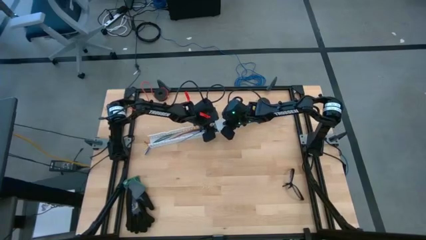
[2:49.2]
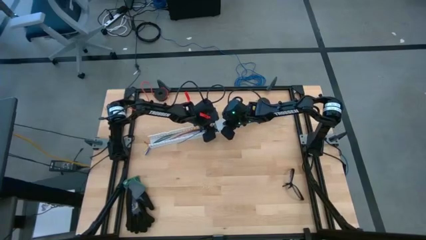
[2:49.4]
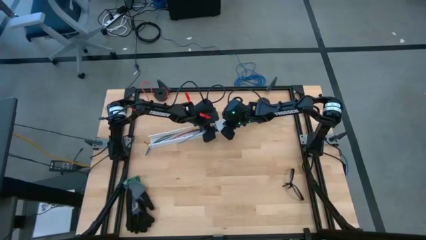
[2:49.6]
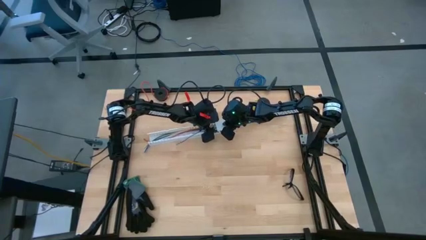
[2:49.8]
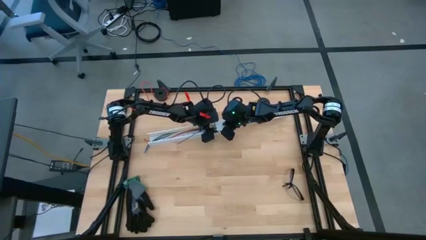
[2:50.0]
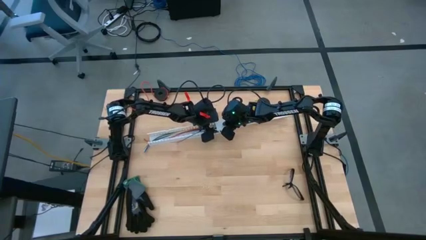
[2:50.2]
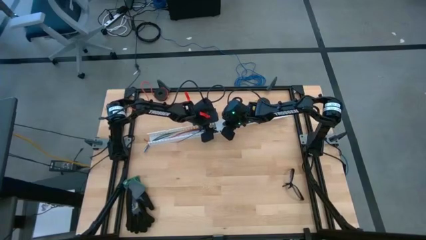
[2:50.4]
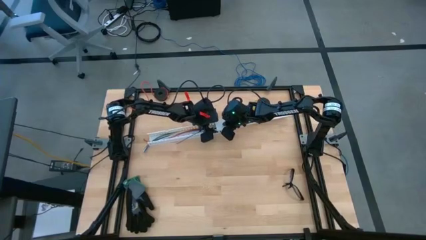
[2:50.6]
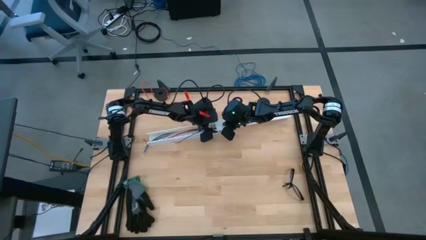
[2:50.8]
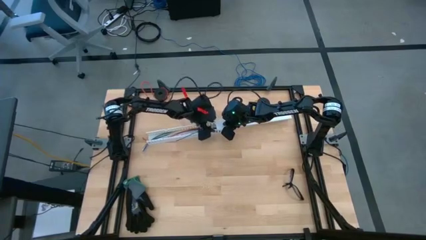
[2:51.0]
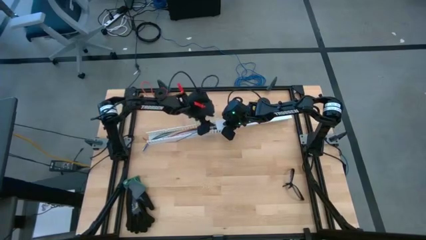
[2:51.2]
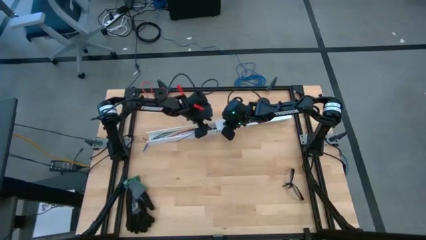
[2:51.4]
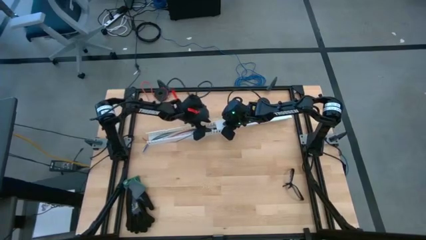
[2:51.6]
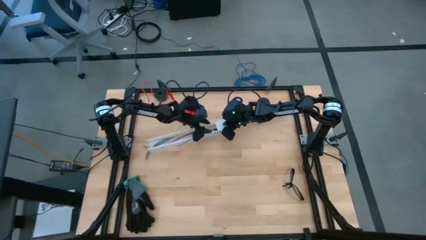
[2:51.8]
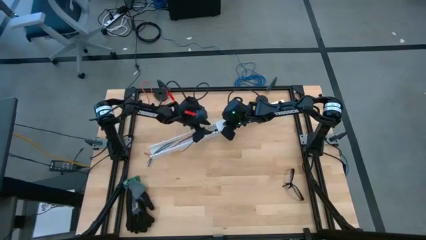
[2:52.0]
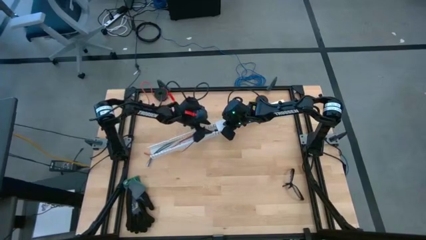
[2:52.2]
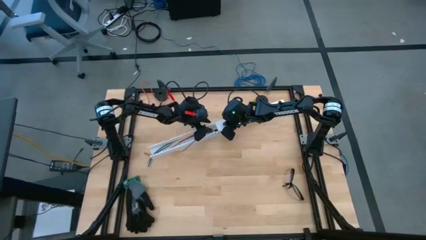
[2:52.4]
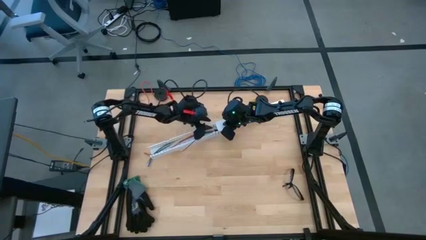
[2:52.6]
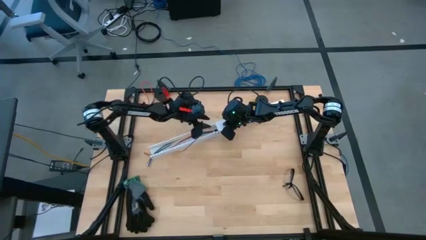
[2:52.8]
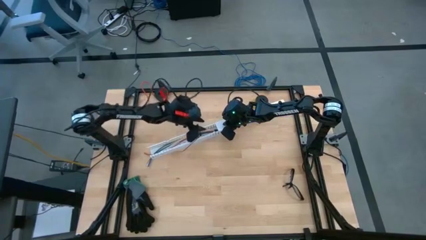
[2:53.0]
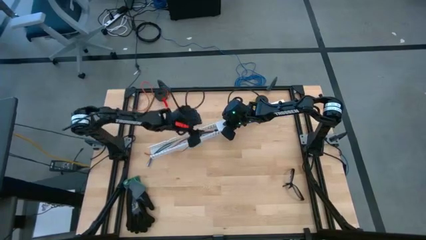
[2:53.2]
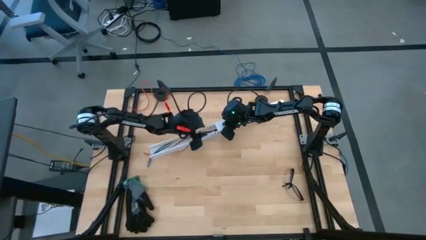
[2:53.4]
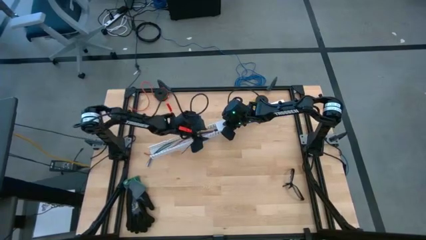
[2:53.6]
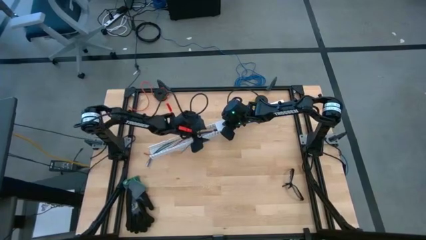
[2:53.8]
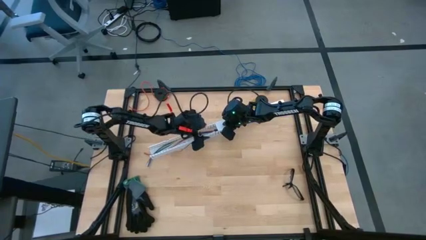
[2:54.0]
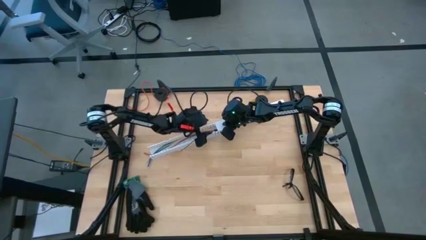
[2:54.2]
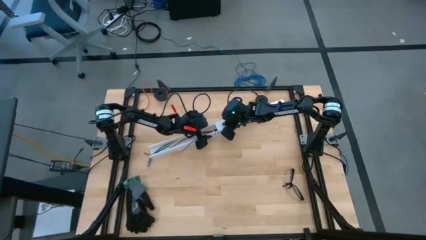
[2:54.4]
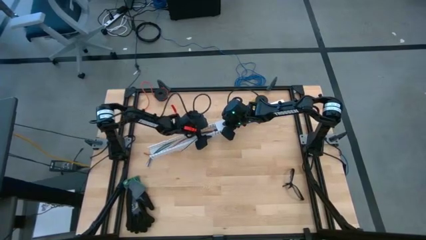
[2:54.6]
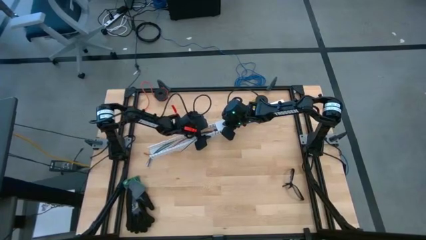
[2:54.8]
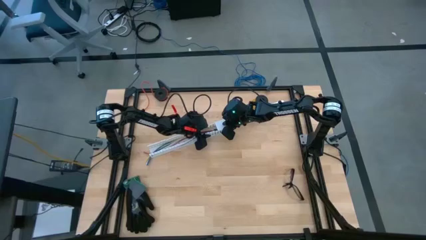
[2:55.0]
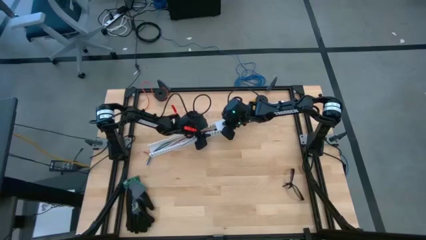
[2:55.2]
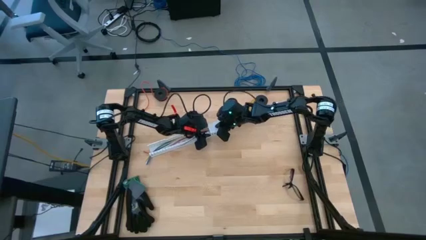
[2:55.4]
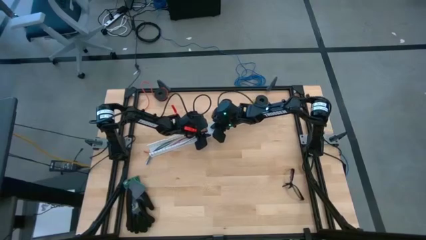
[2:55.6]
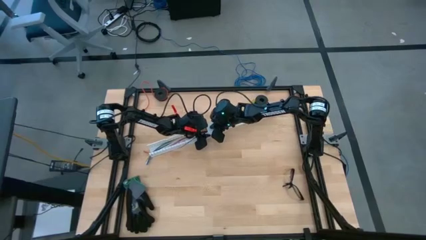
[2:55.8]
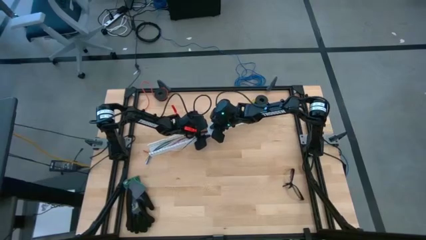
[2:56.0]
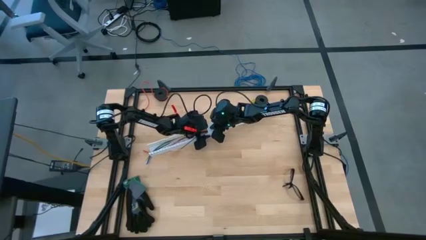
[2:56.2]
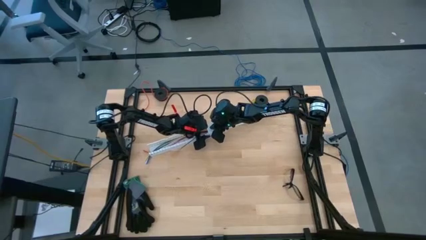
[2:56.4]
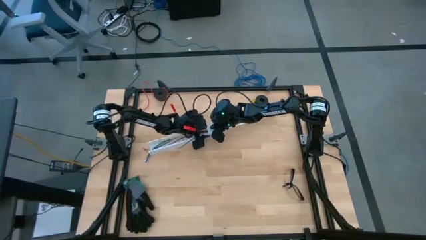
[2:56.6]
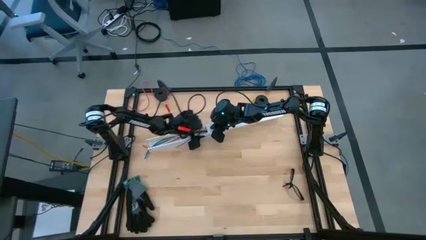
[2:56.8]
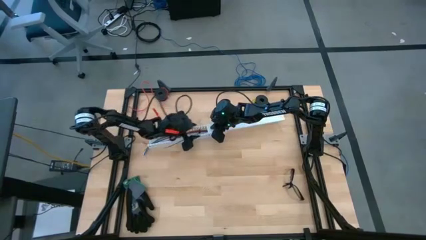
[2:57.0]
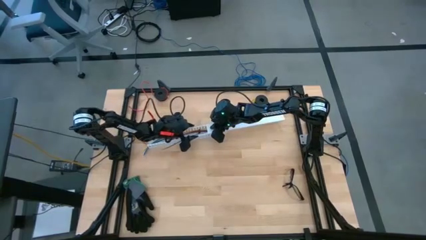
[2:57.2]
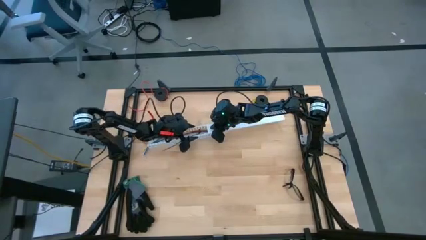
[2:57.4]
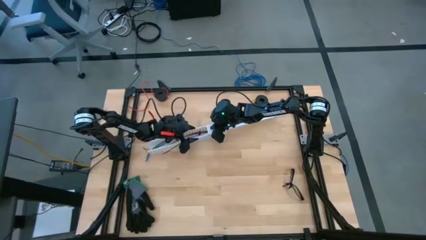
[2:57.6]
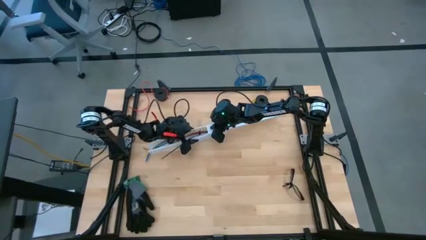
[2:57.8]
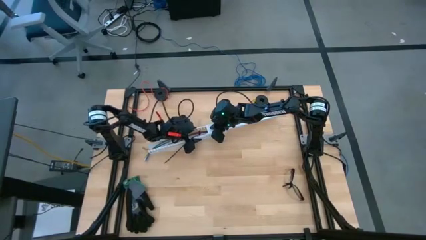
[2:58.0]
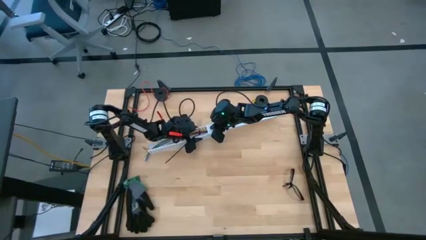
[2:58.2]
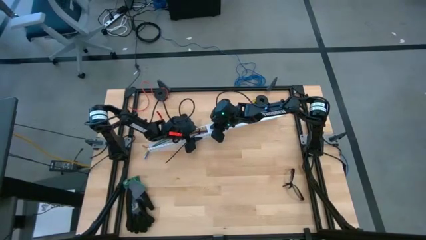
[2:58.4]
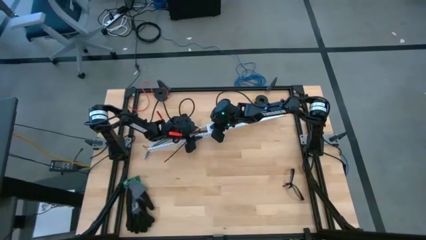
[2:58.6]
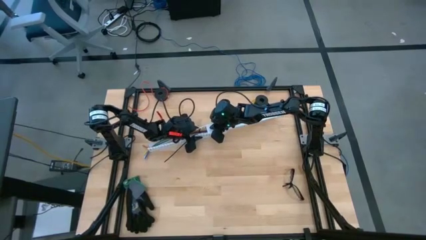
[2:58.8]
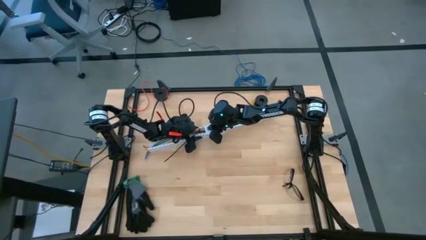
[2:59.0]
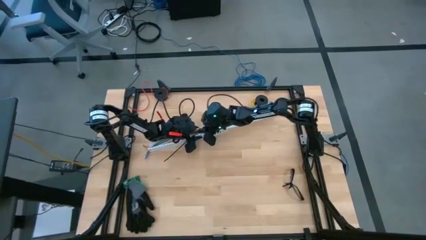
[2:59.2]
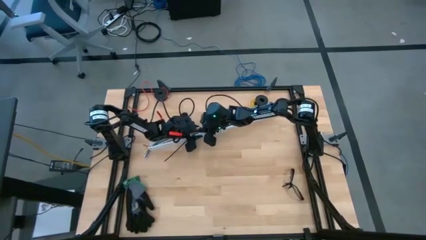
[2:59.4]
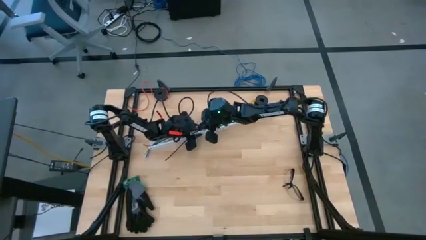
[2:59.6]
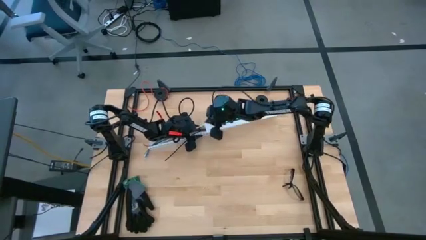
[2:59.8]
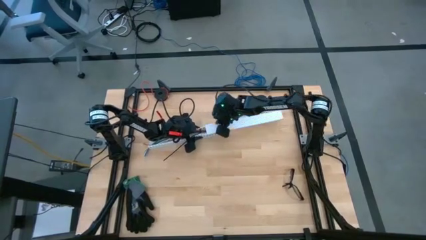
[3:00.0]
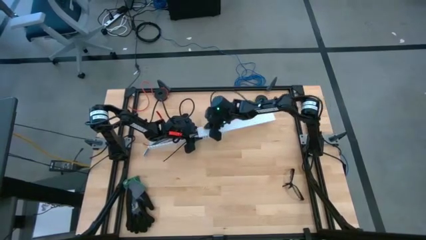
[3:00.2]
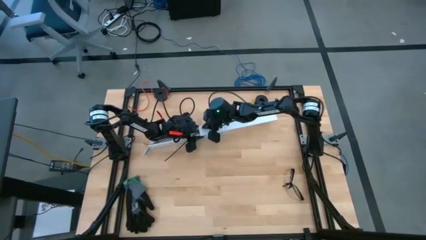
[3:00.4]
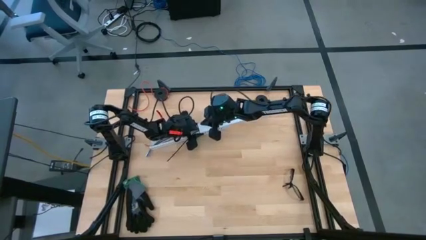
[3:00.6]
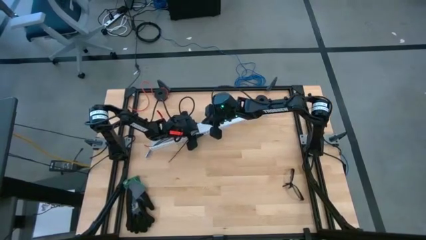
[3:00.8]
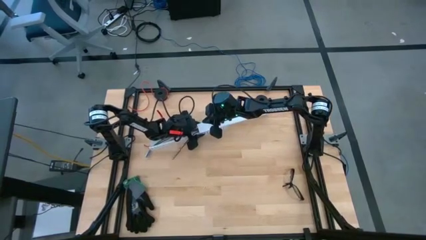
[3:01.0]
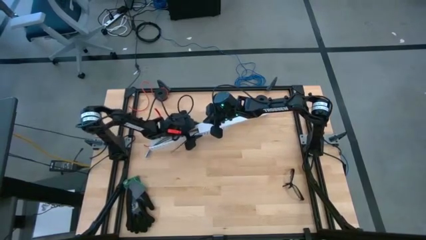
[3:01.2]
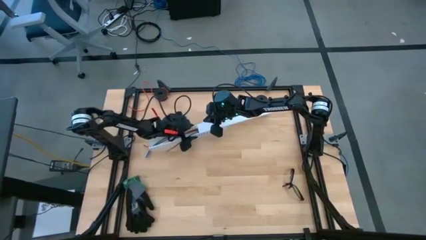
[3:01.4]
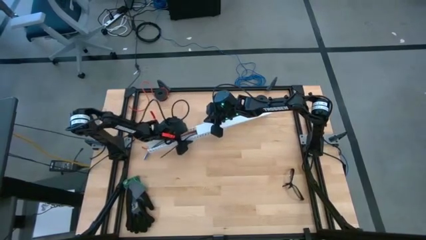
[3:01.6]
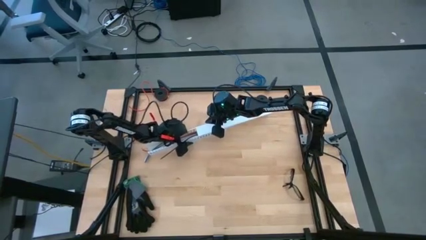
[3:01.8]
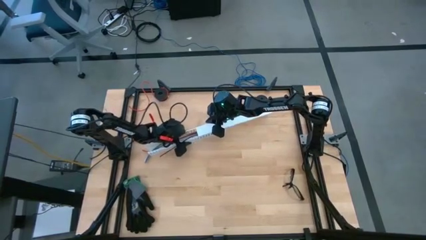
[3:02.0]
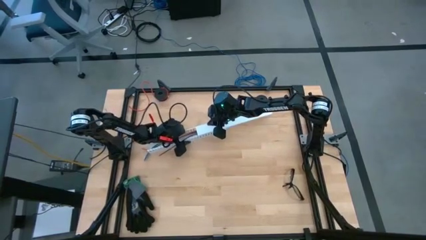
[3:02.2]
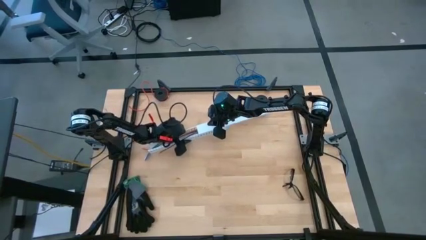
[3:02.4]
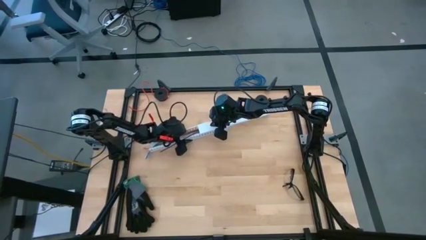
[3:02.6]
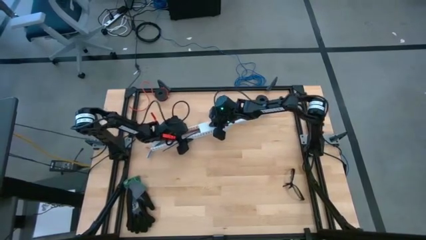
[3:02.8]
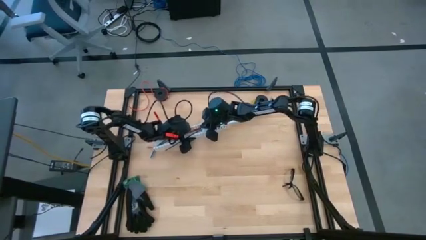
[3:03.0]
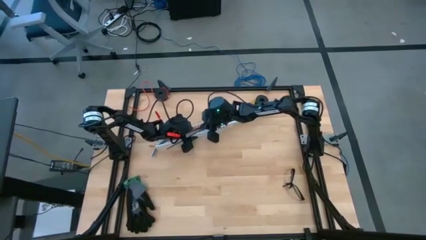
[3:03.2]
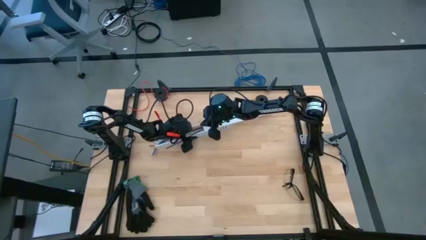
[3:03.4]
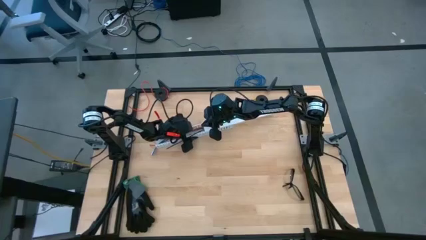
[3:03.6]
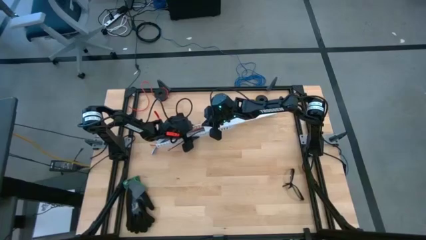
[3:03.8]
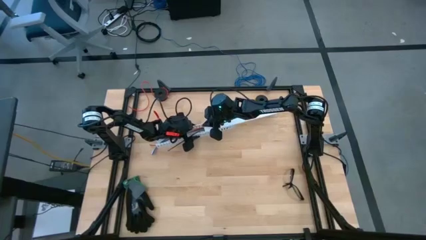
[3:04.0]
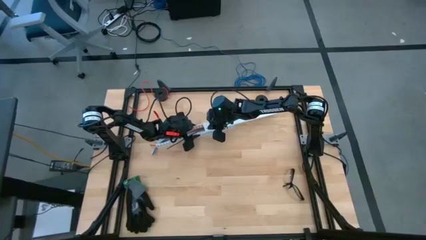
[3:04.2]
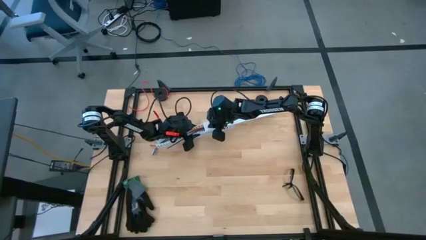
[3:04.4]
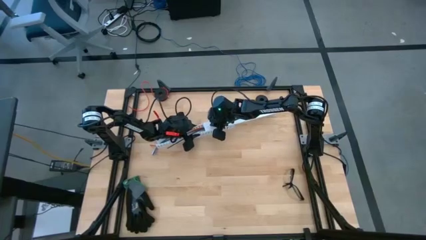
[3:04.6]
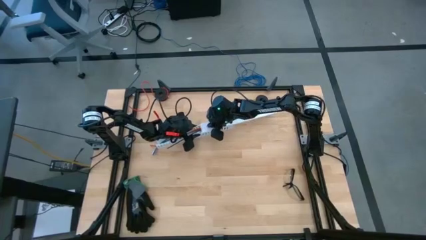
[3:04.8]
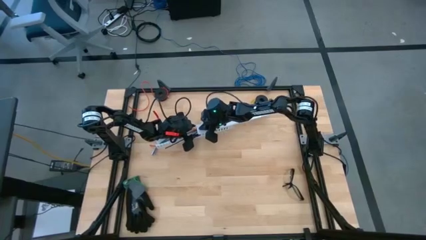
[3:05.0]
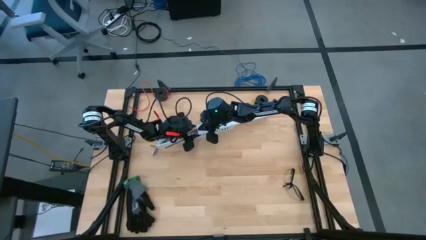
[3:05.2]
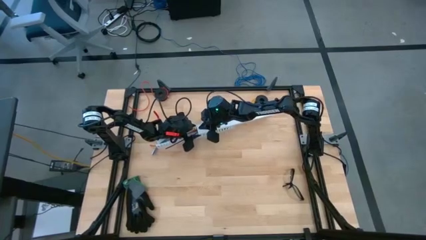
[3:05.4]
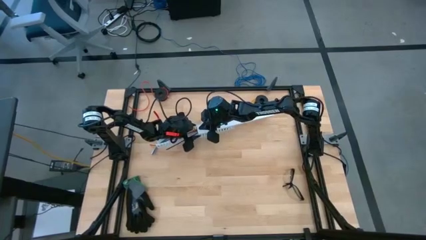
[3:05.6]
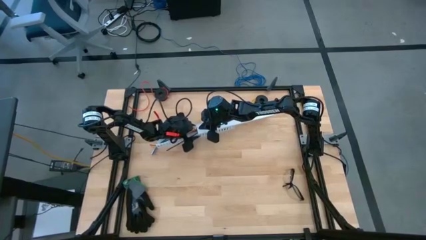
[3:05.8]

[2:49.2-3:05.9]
Task: Ziptie cables
Close the white cable duct
